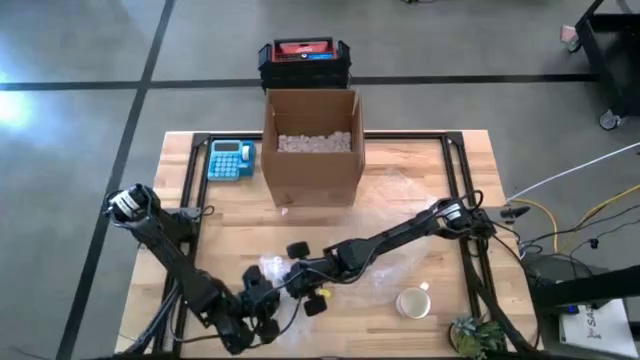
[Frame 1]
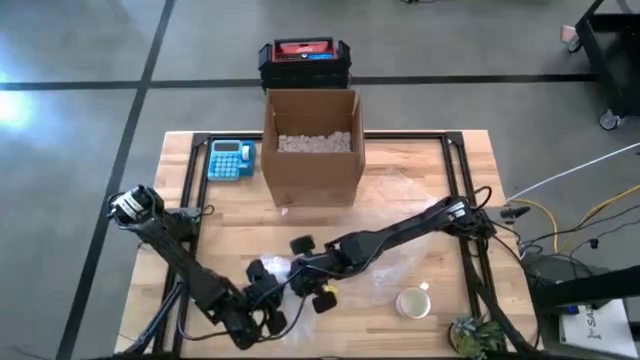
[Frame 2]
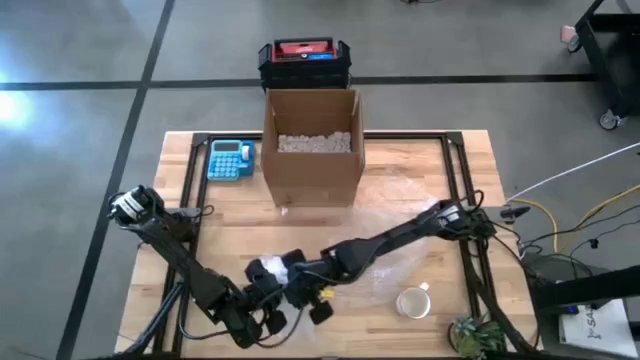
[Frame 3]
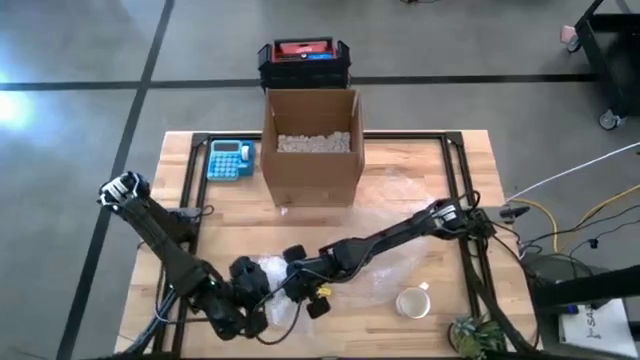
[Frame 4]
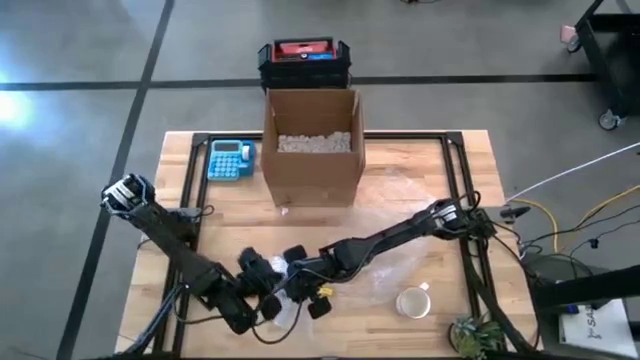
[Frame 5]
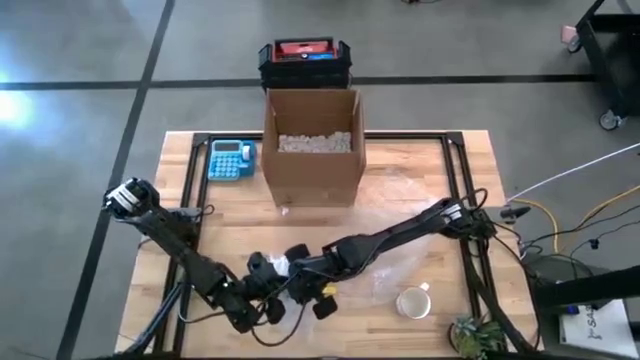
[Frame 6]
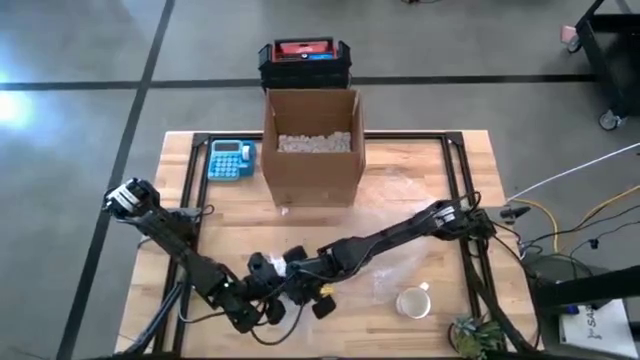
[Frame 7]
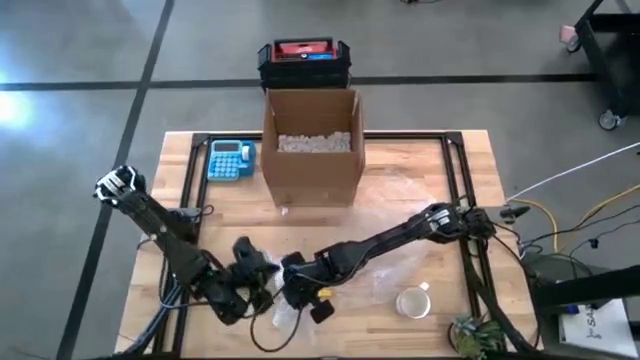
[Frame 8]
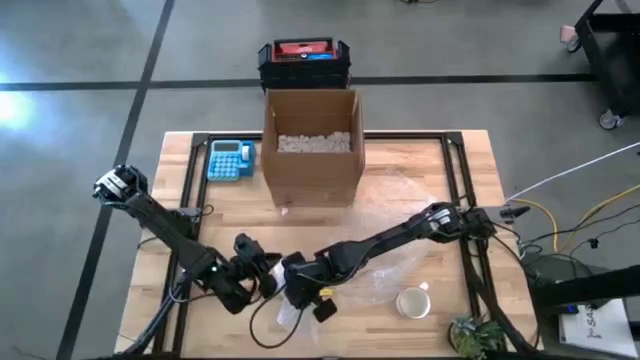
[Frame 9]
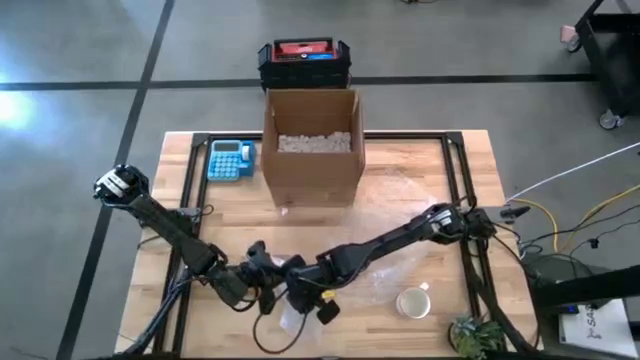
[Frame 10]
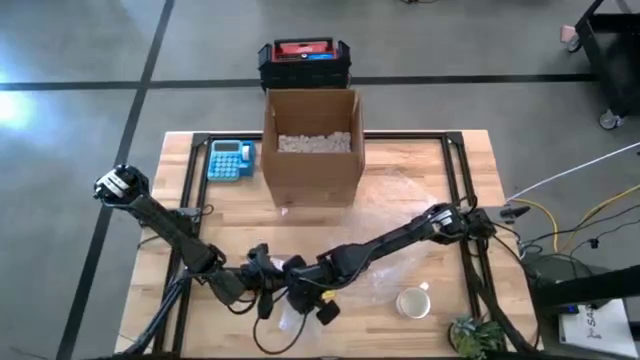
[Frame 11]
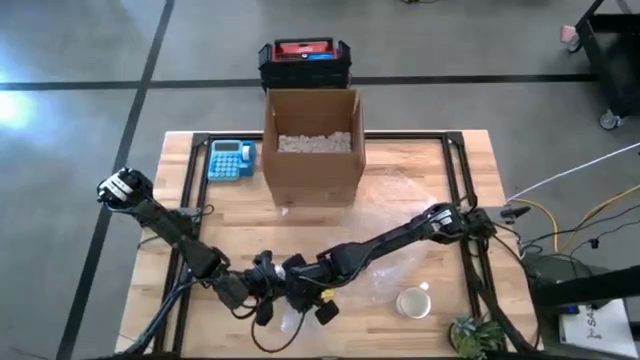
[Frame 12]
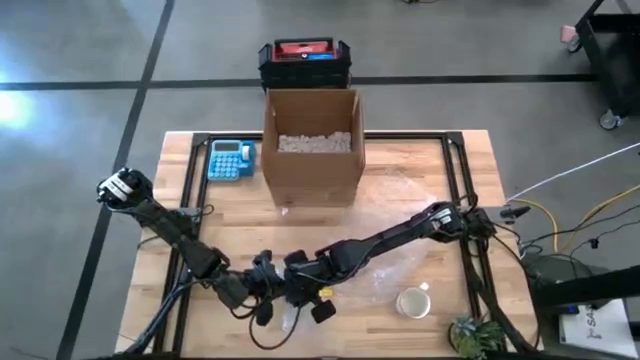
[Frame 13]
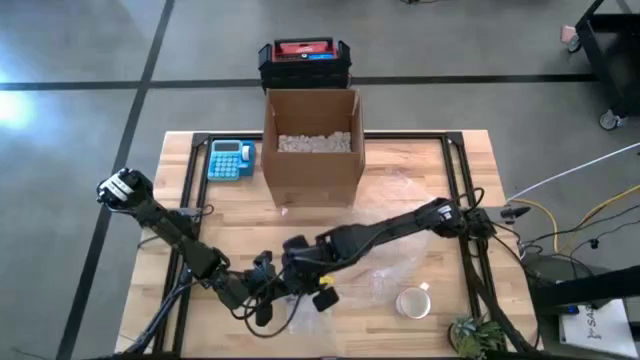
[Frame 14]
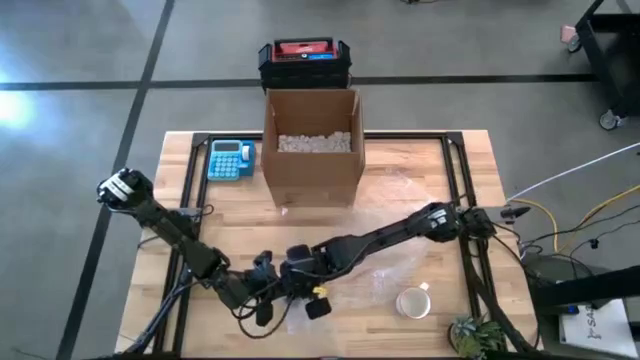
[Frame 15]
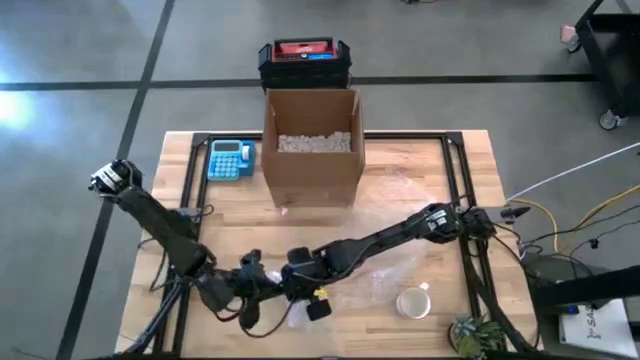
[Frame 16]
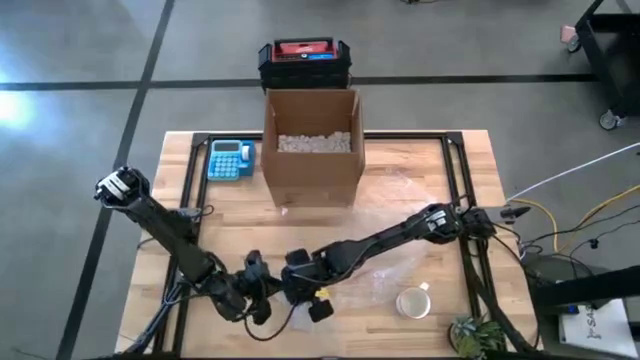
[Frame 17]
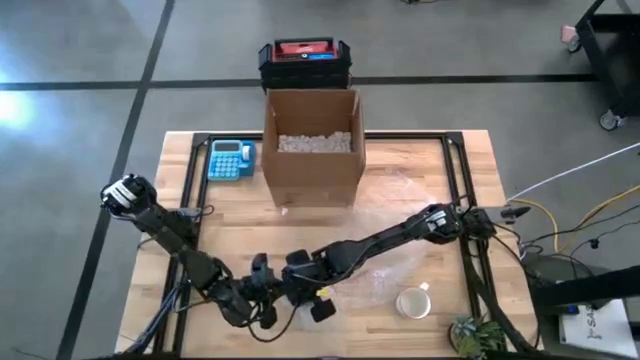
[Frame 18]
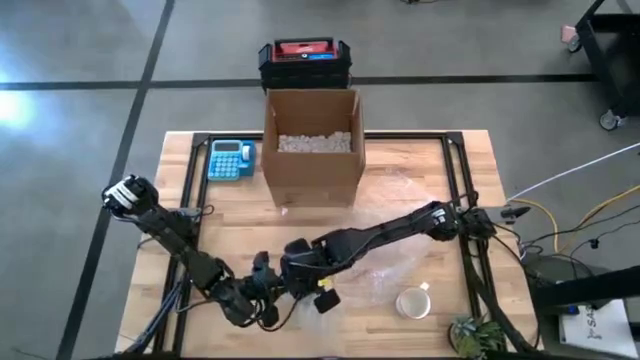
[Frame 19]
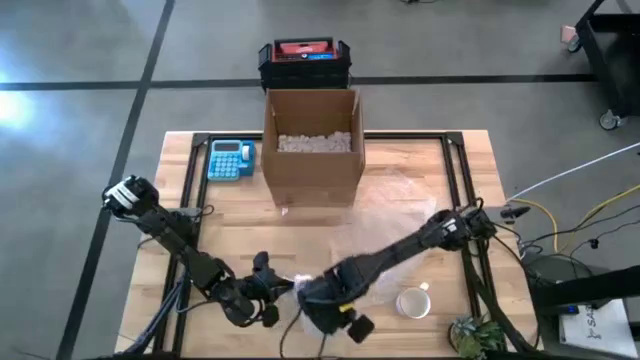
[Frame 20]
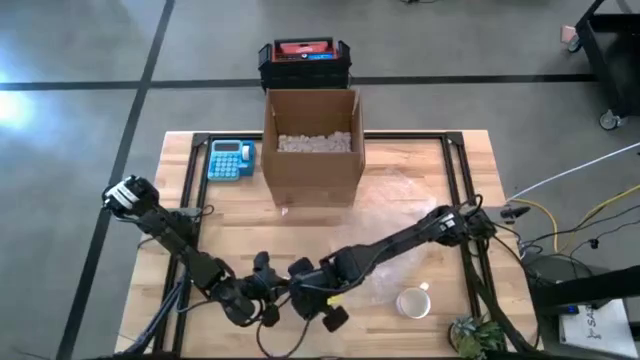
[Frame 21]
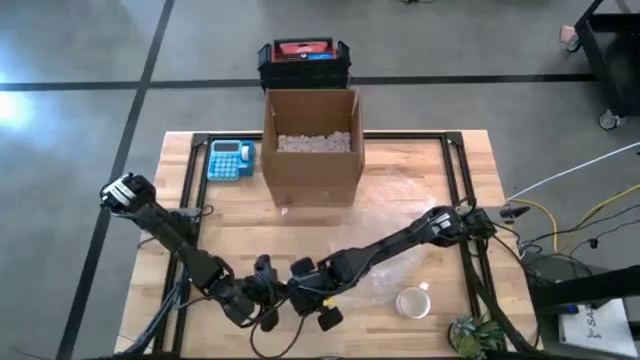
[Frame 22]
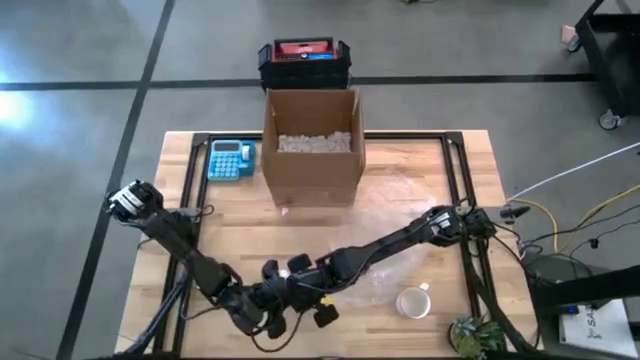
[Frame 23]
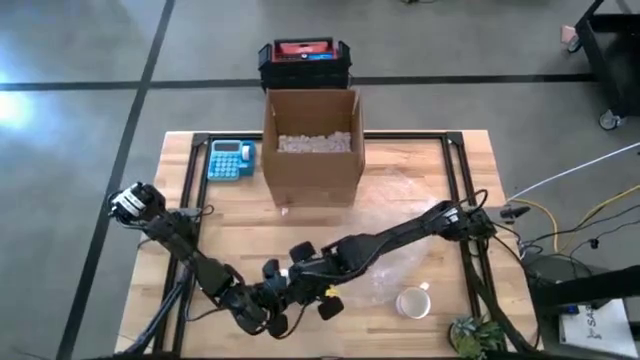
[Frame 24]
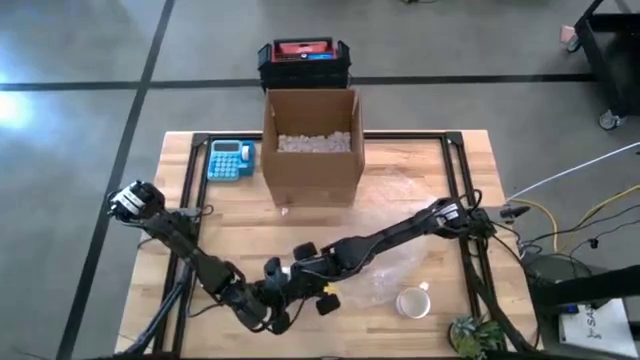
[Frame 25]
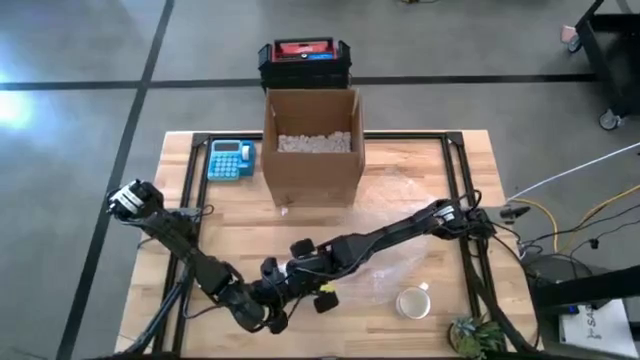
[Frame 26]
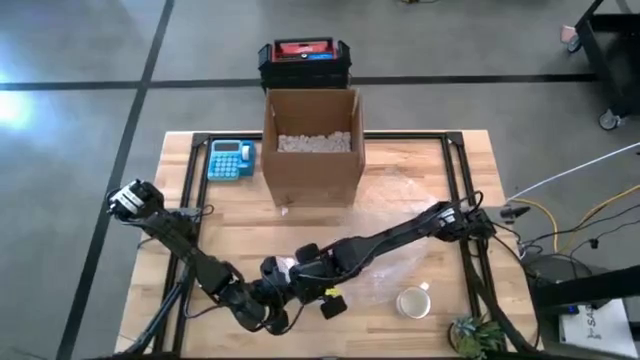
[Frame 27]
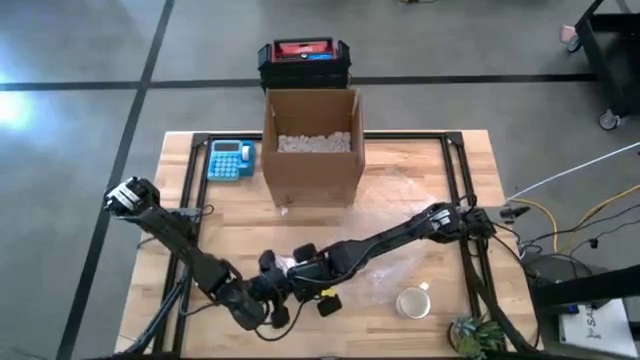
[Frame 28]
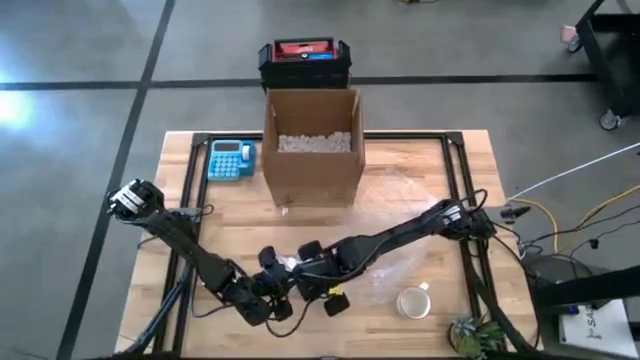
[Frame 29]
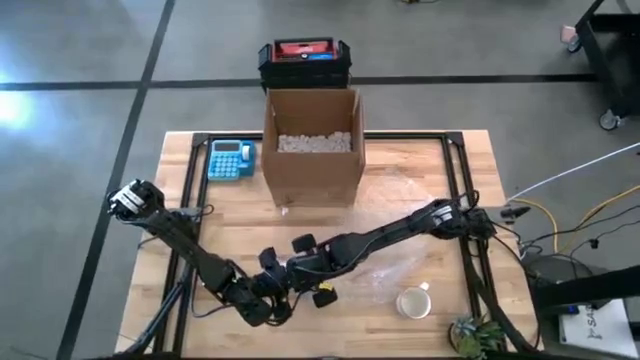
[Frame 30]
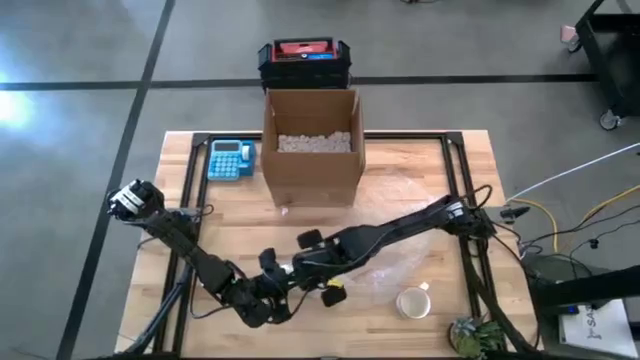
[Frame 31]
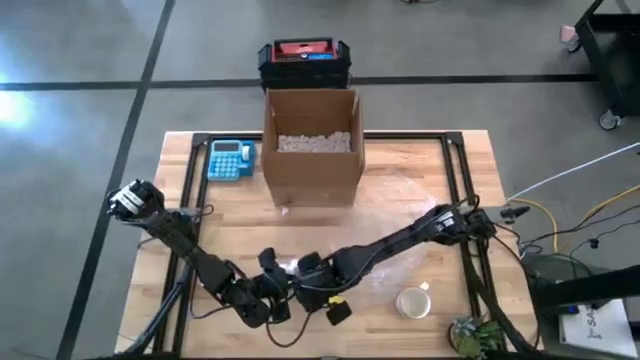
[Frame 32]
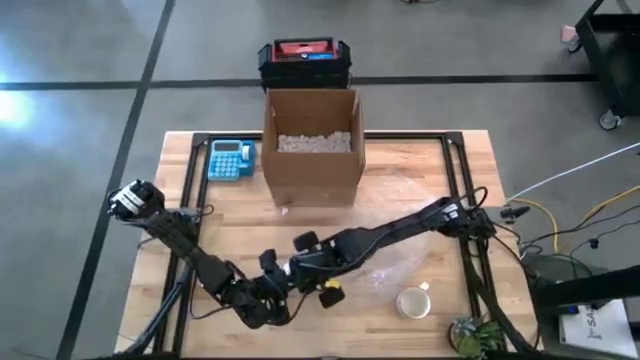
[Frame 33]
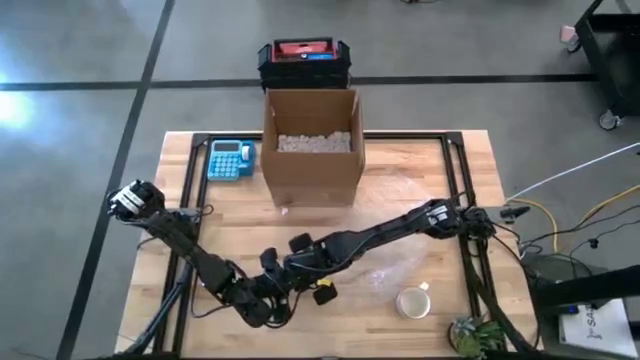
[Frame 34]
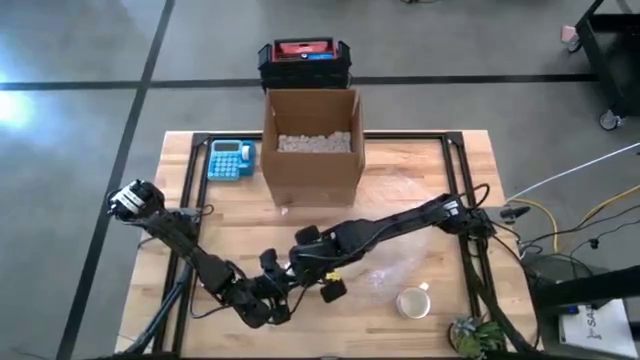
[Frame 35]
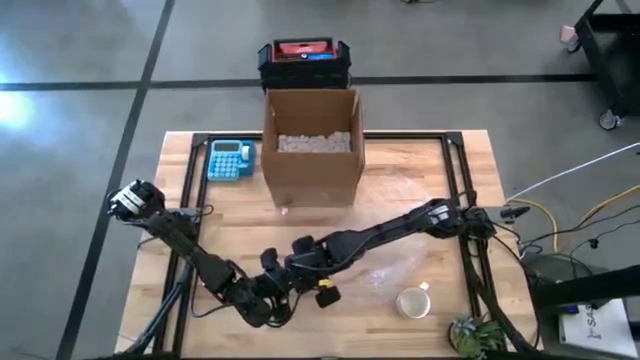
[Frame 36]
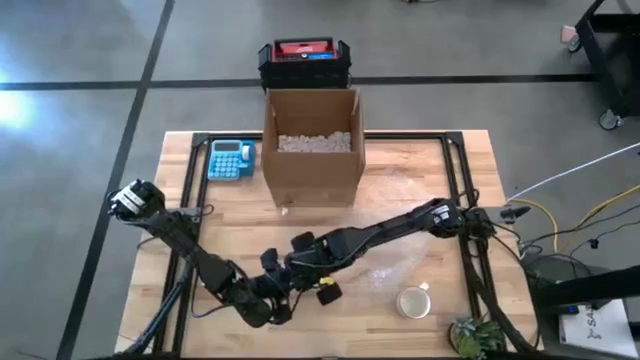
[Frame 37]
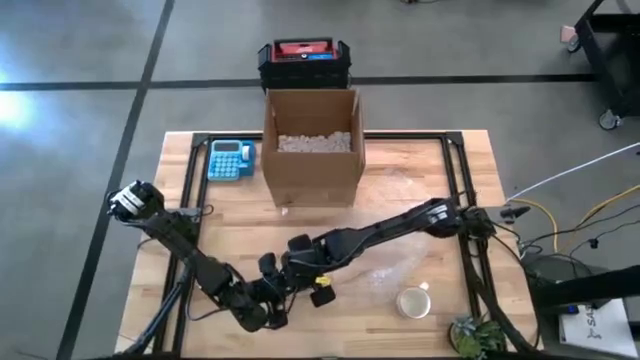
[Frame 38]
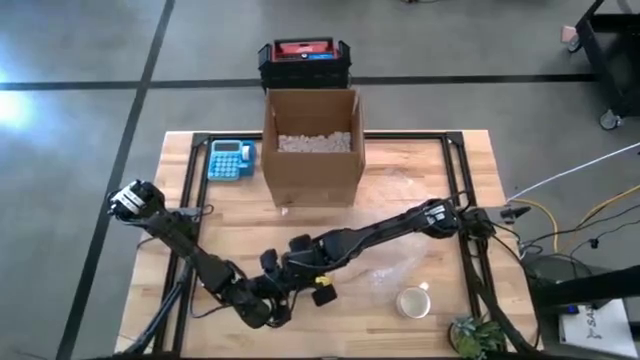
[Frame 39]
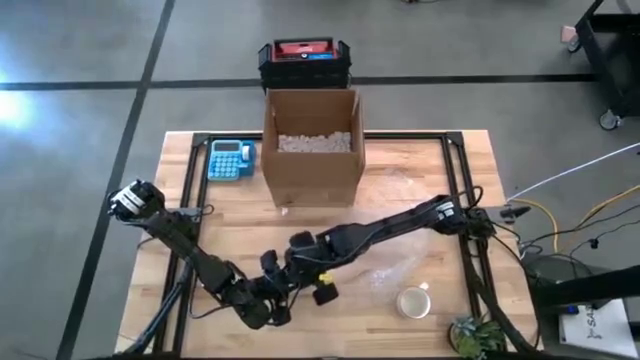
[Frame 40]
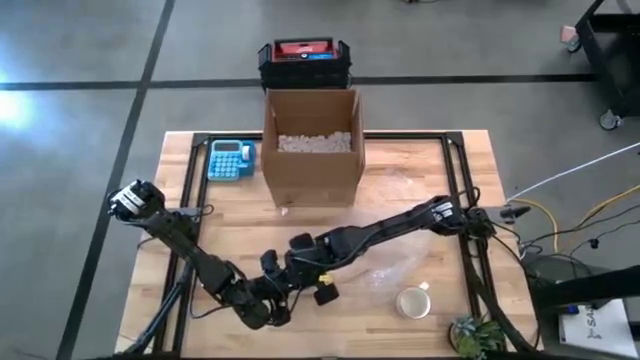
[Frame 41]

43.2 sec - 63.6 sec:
Task: wrap mug
Wrap the purple mug with transparent bubble wrap

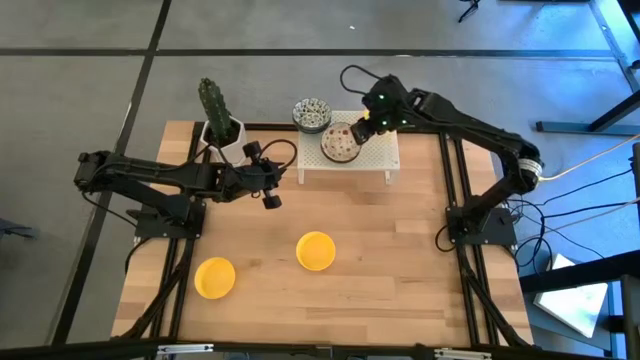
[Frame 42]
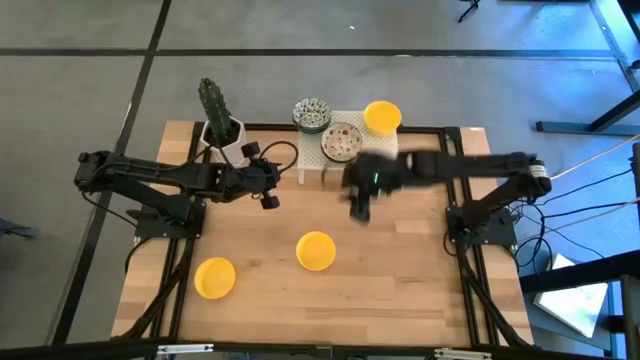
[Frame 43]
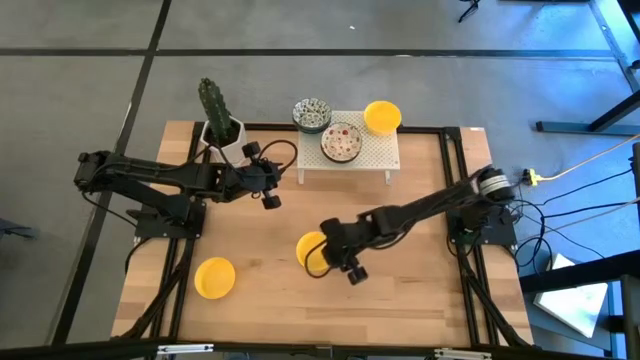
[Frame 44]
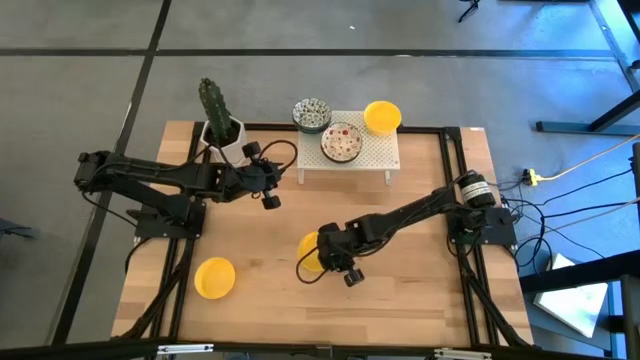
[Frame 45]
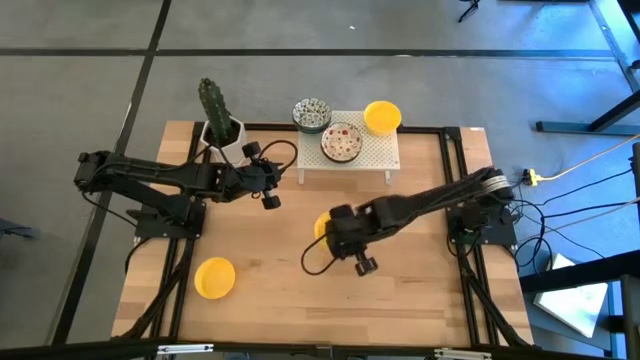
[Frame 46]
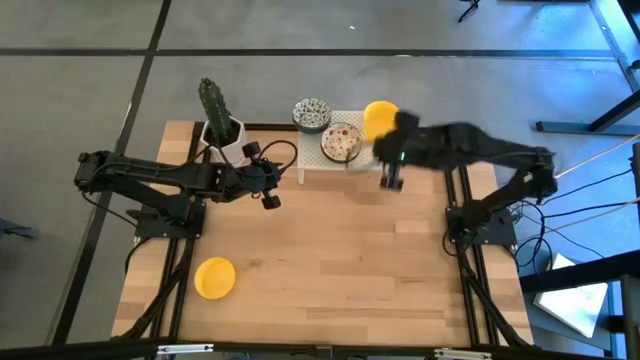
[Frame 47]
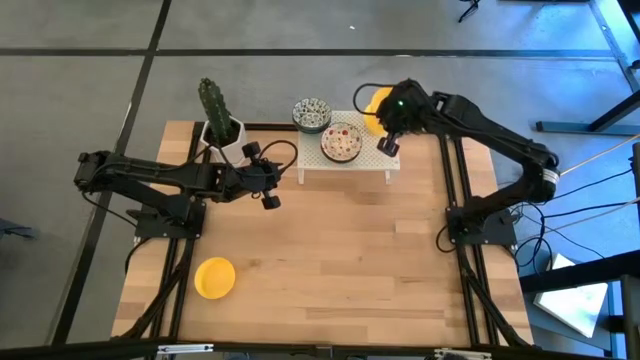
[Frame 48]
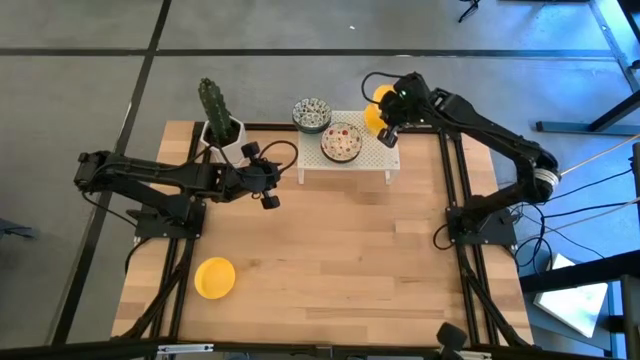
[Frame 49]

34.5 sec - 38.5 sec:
Task: Pick & Place Mini bowls
Stack the right yellow bowl on top of the yellow bowl on the shelf
